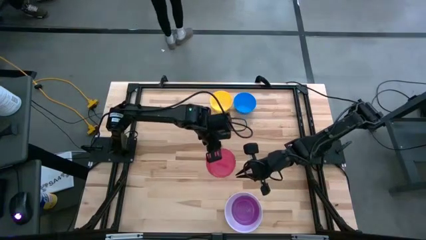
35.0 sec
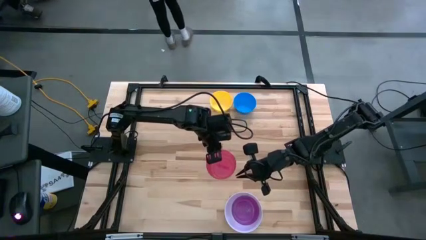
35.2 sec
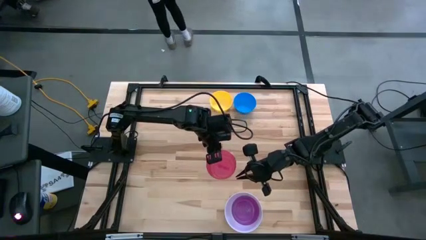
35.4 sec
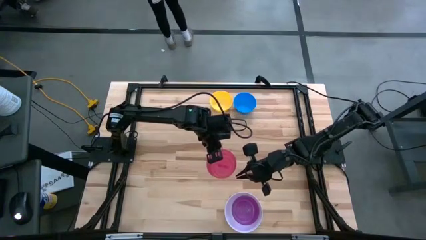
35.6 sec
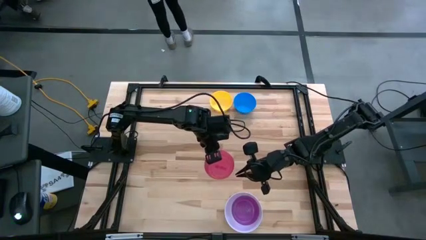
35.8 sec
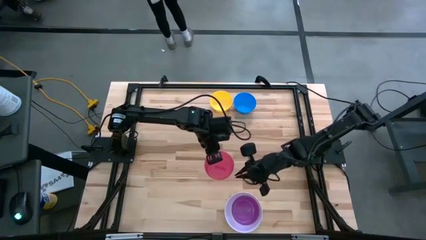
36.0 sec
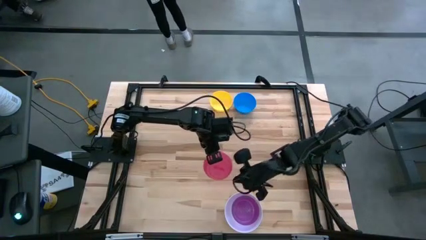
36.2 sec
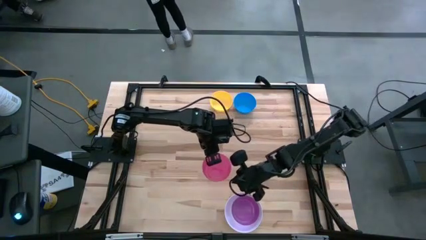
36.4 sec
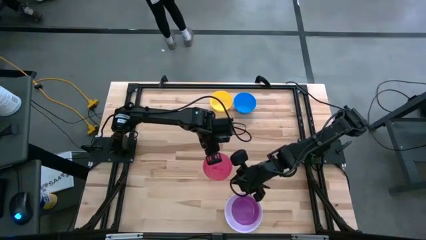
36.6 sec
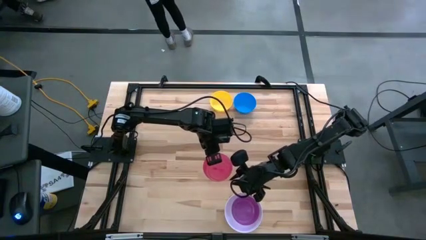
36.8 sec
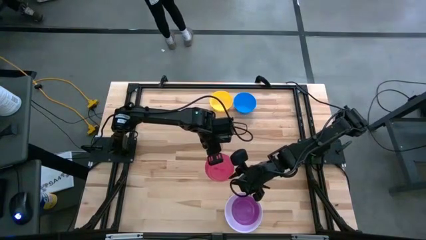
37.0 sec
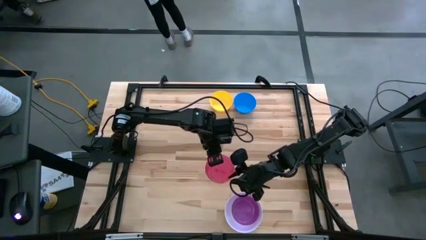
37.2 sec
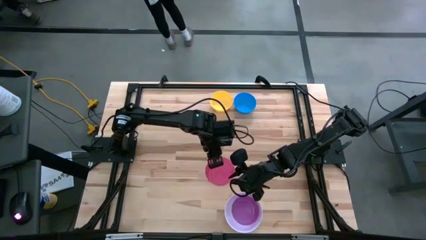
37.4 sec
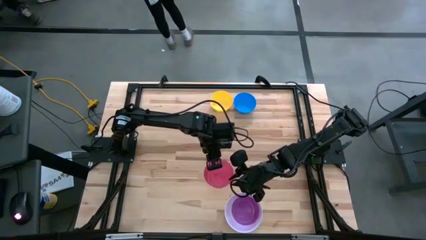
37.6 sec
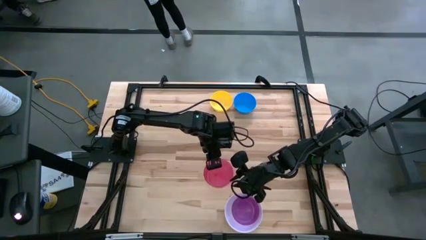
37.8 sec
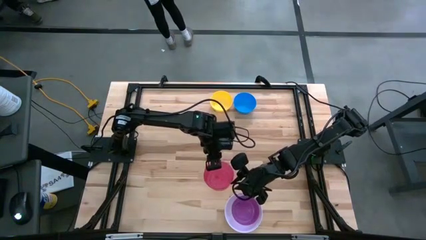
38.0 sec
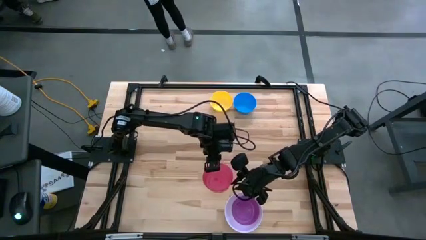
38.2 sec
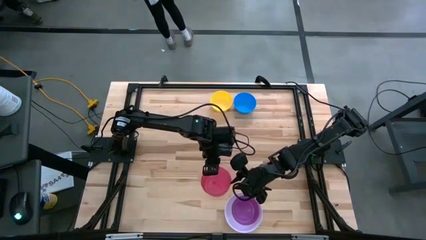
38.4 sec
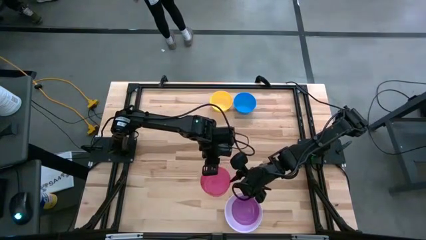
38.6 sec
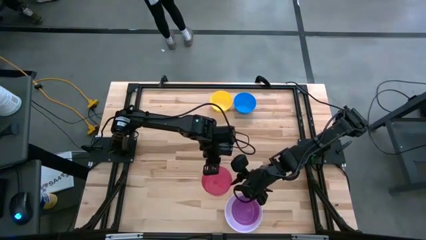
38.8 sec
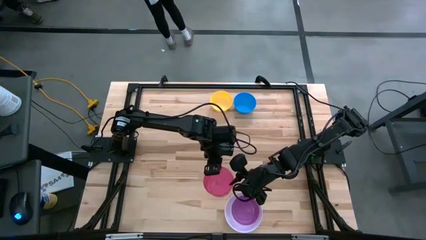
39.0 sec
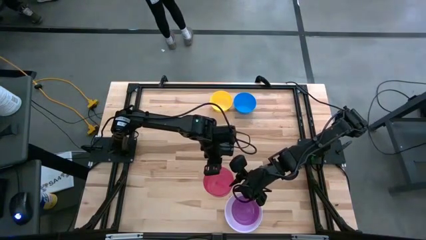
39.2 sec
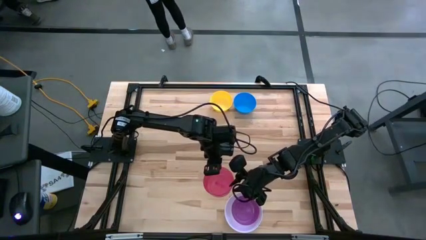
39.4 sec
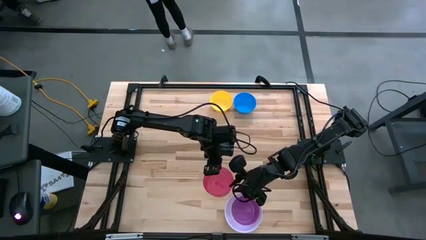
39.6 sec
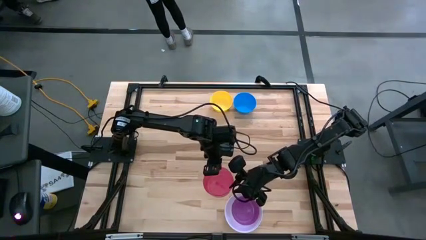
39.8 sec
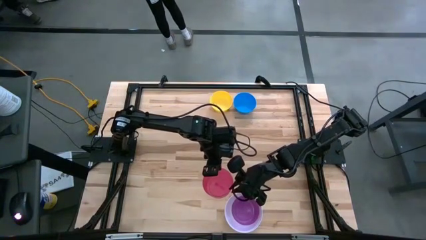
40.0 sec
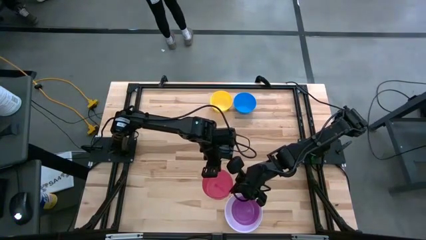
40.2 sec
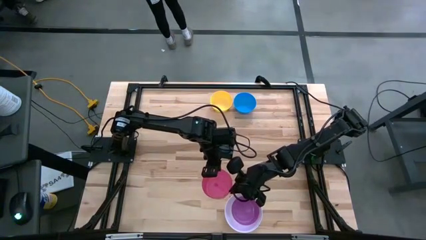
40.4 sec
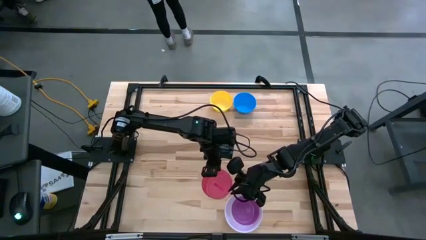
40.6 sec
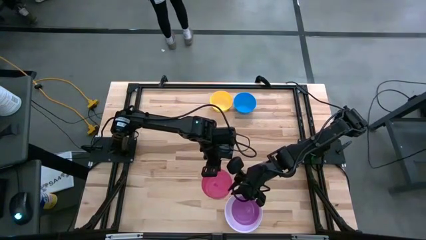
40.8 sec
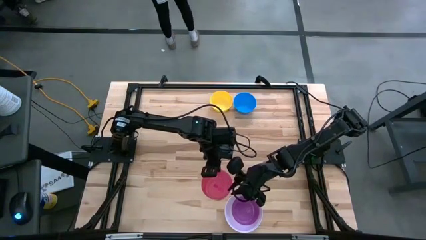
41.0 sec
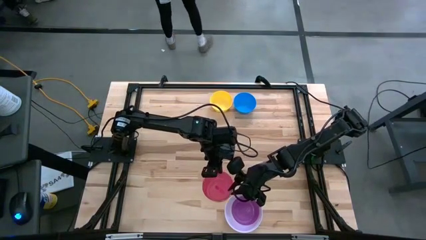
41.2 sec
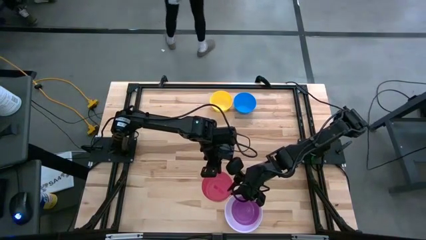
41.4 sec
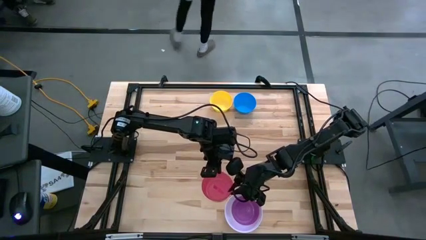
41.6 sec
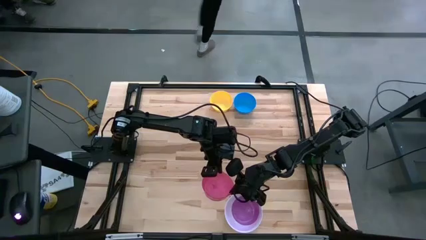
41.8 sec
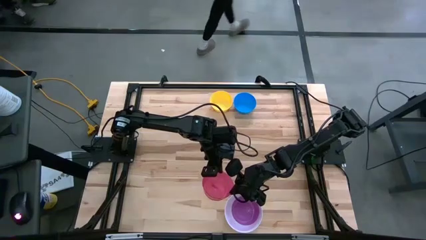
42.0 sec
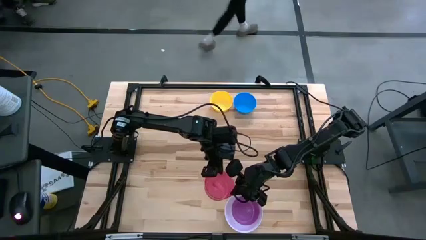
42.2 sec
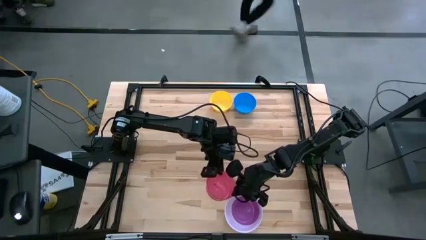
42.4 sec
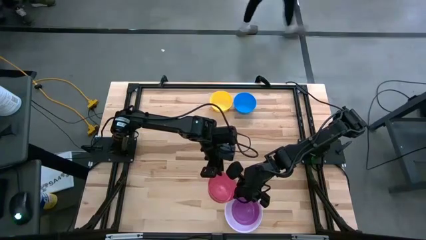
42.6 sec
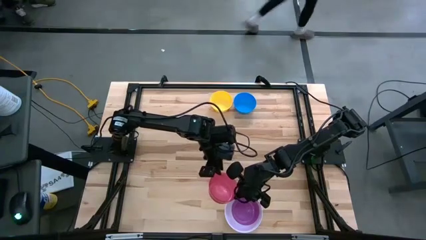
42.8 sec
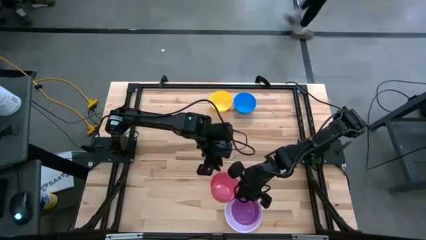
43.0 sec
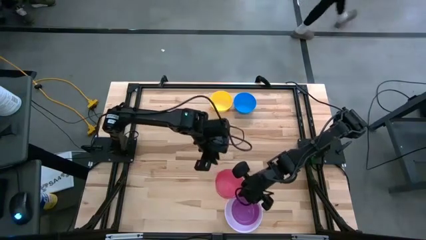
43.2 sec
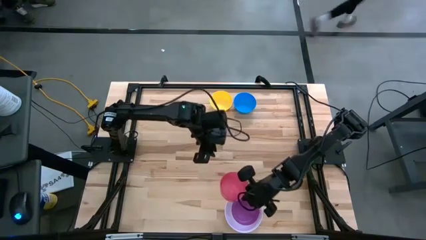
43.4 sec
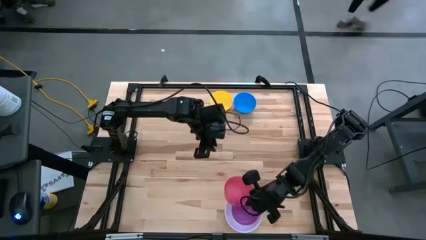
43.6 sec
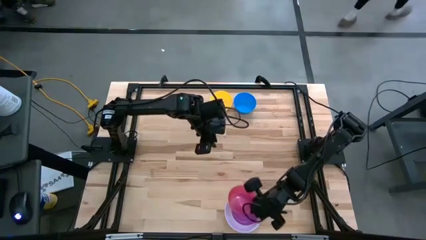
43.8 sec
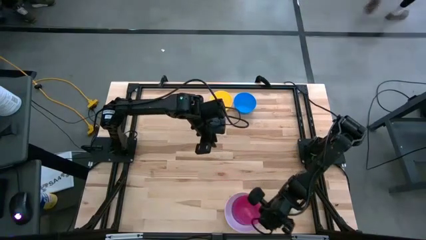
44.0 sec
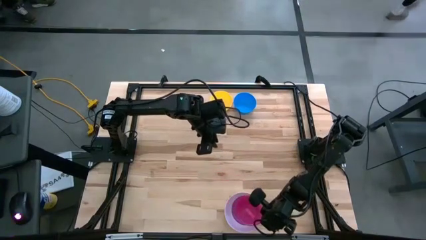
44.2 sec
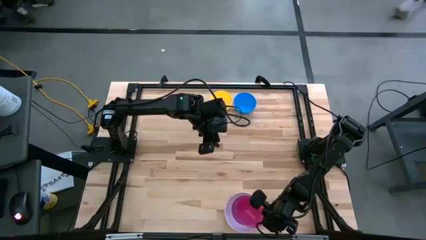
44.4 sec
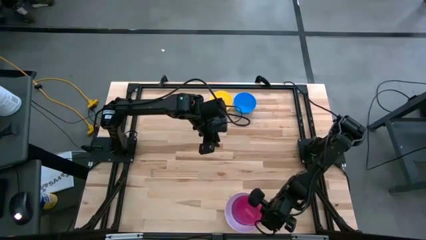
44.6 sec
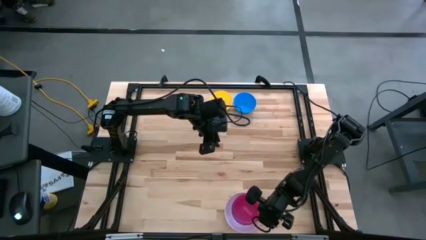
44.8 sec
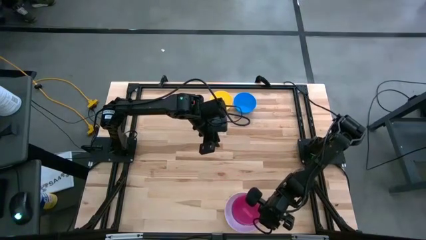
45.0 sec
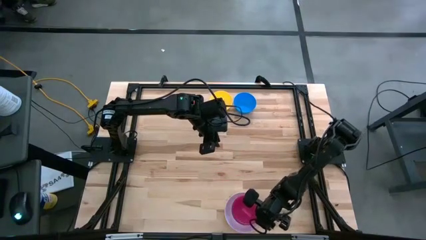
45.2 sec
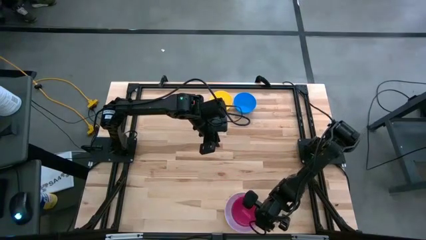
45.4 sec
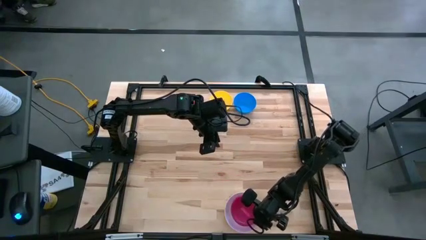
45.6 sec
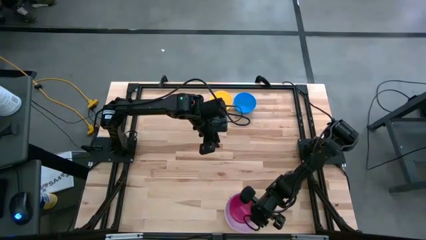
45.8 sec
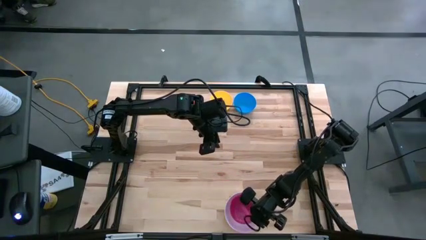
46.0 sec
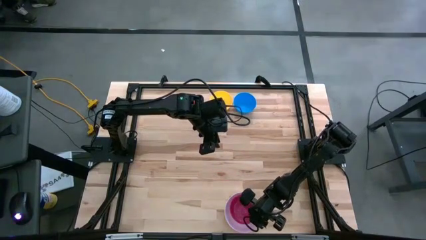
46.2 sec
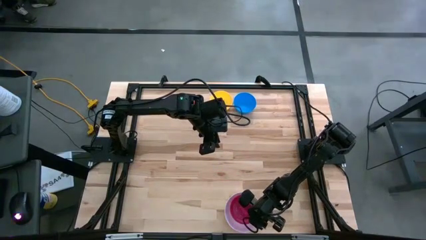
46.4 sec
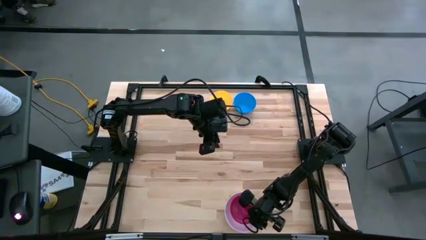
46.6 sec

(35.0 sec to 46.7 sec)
Stack the red bowl on the violet bowl
